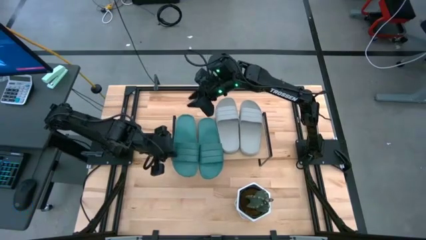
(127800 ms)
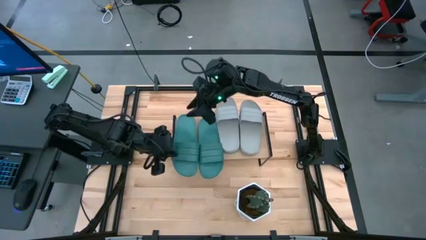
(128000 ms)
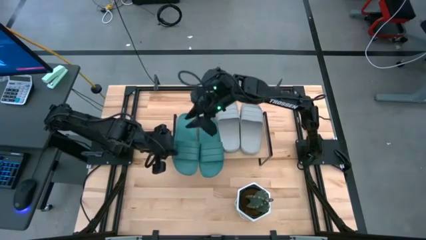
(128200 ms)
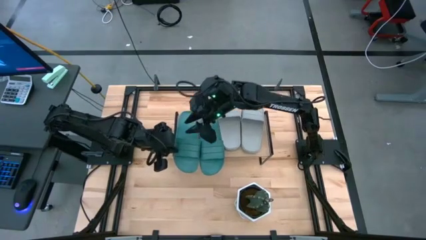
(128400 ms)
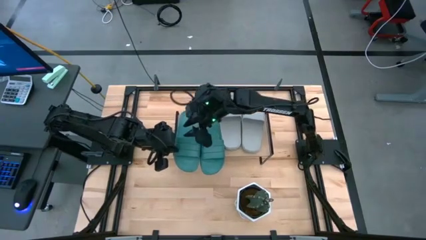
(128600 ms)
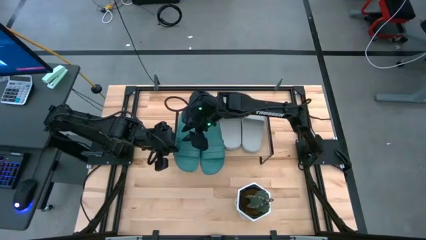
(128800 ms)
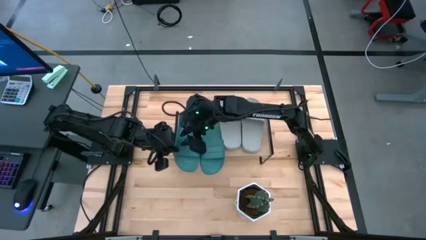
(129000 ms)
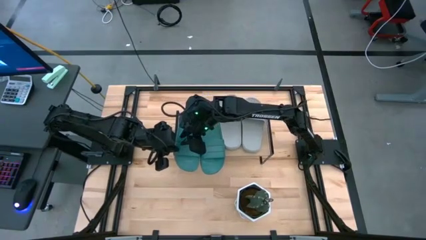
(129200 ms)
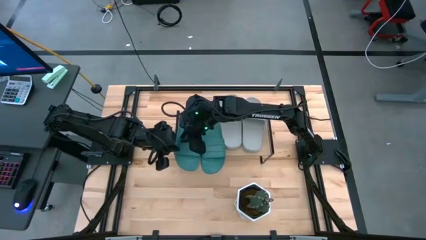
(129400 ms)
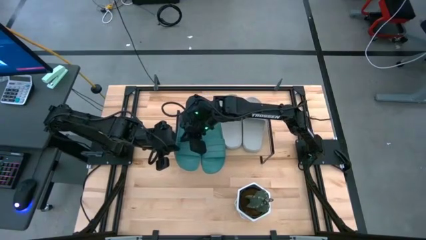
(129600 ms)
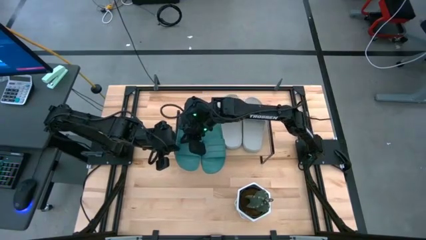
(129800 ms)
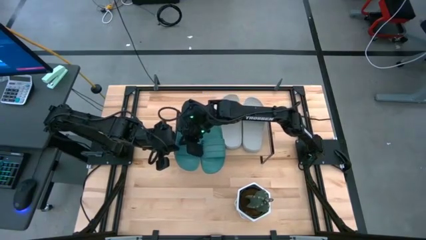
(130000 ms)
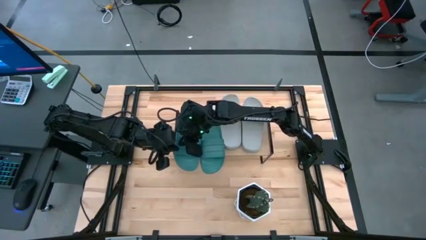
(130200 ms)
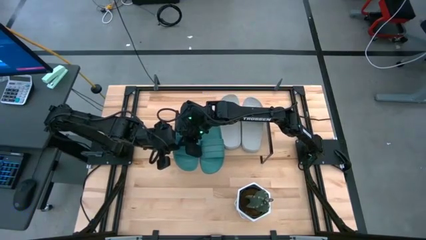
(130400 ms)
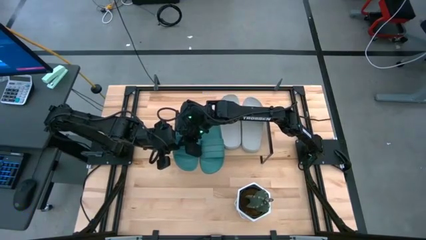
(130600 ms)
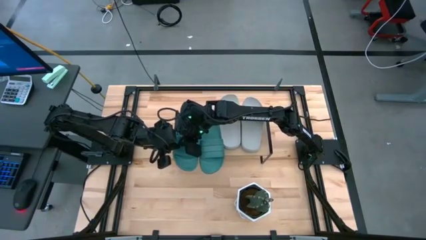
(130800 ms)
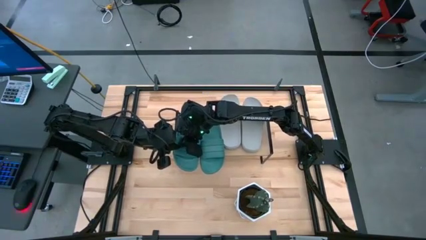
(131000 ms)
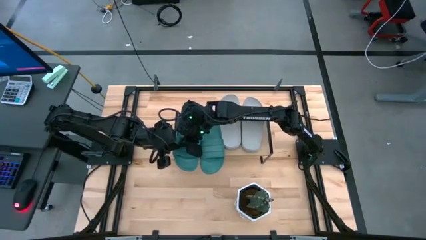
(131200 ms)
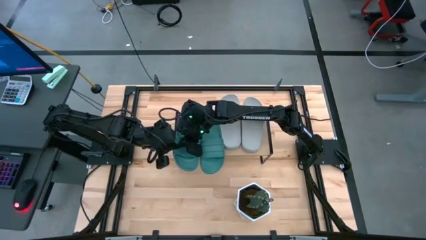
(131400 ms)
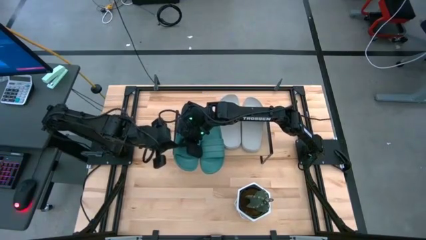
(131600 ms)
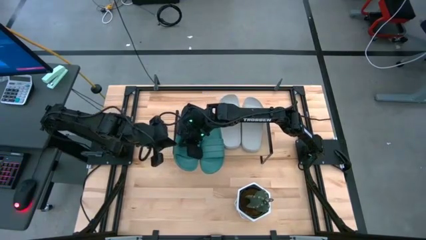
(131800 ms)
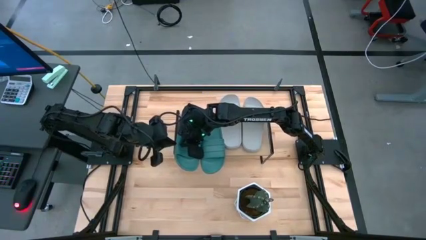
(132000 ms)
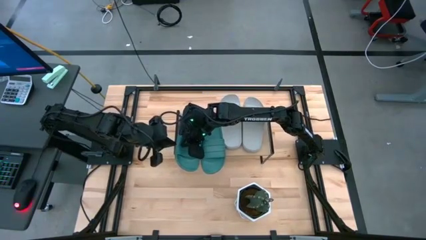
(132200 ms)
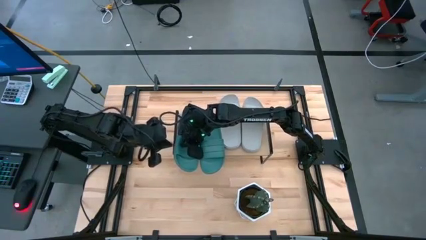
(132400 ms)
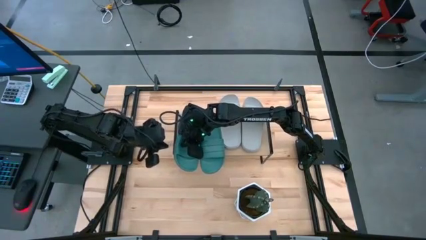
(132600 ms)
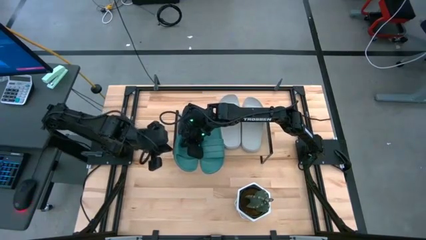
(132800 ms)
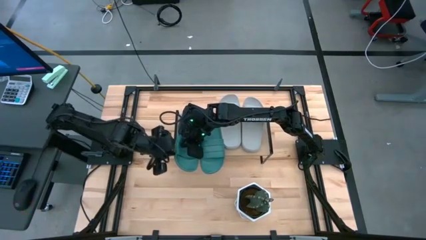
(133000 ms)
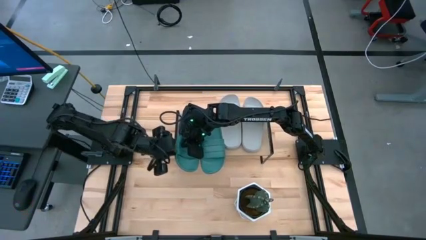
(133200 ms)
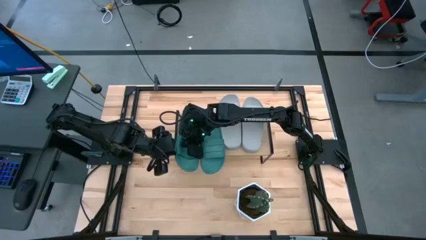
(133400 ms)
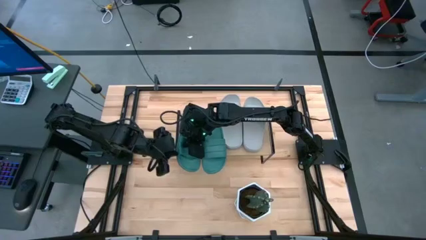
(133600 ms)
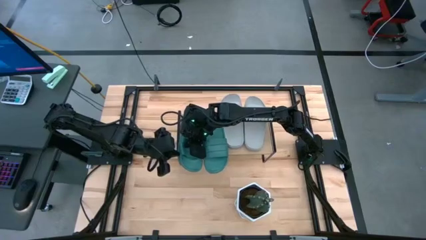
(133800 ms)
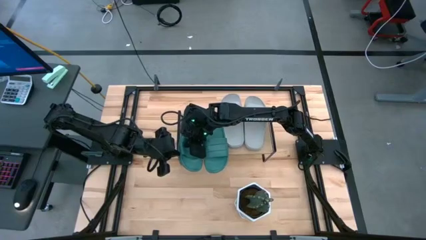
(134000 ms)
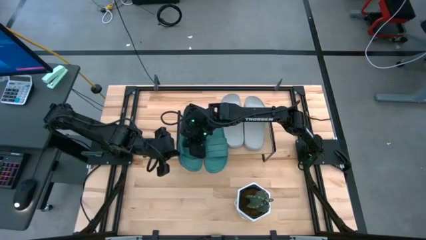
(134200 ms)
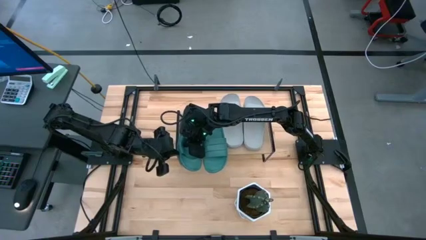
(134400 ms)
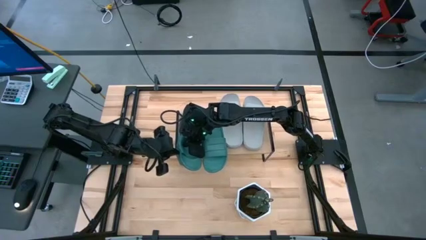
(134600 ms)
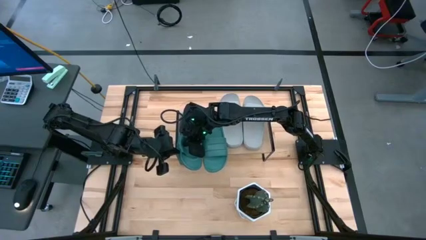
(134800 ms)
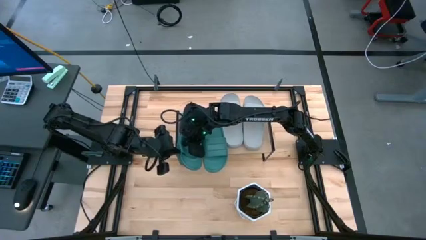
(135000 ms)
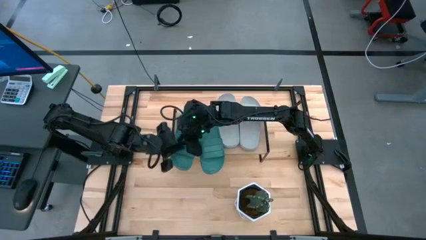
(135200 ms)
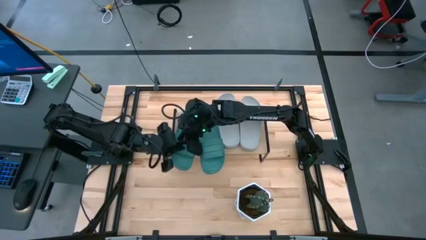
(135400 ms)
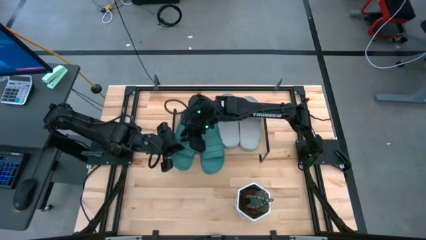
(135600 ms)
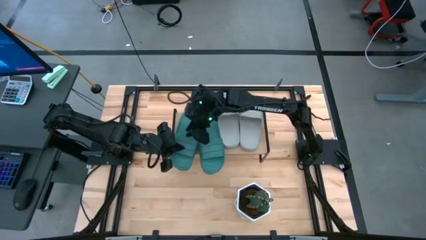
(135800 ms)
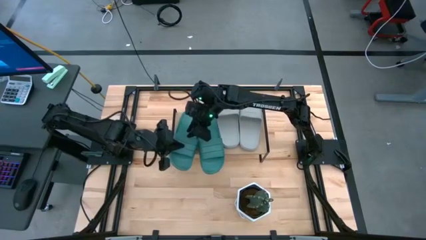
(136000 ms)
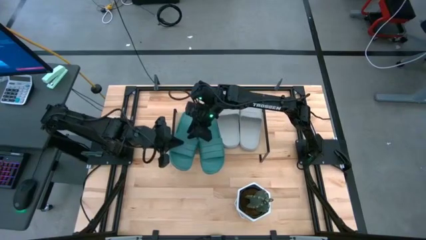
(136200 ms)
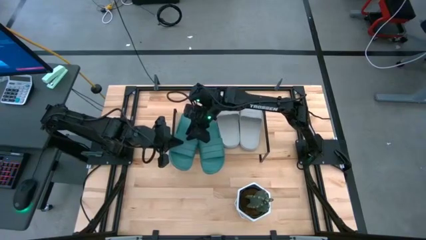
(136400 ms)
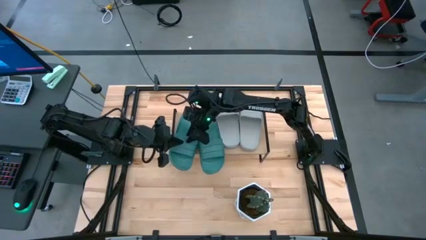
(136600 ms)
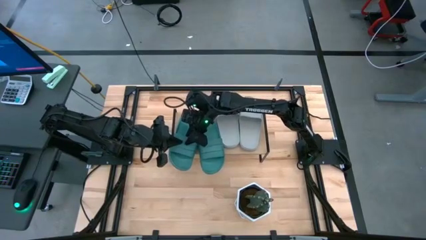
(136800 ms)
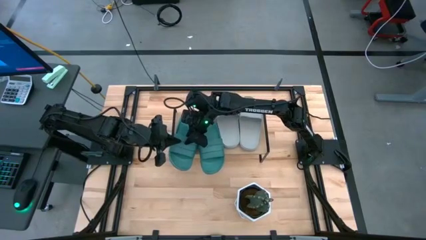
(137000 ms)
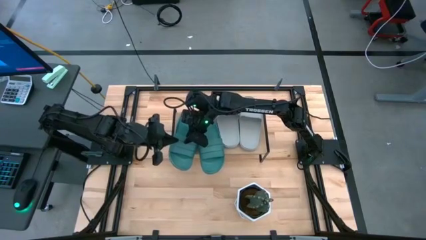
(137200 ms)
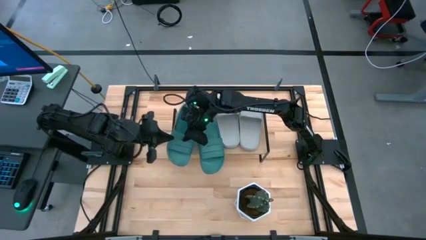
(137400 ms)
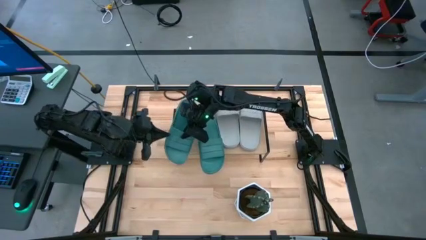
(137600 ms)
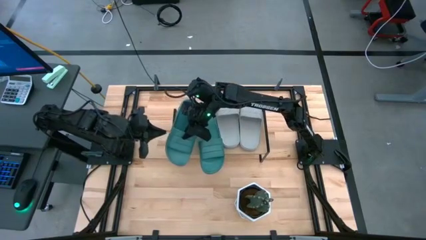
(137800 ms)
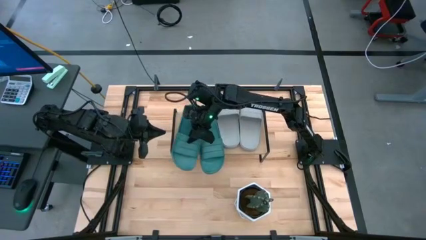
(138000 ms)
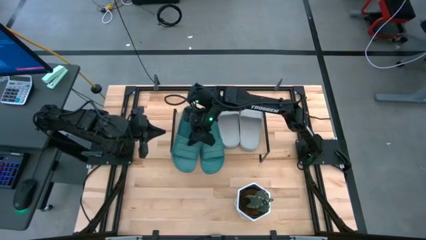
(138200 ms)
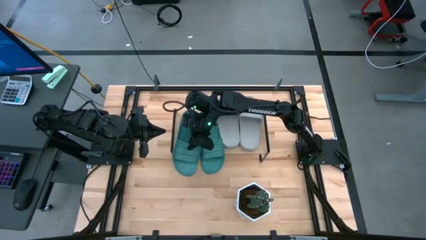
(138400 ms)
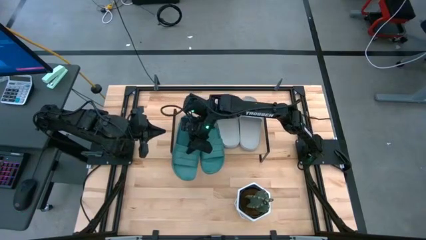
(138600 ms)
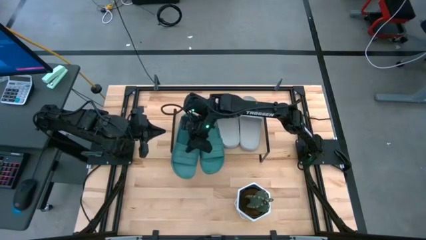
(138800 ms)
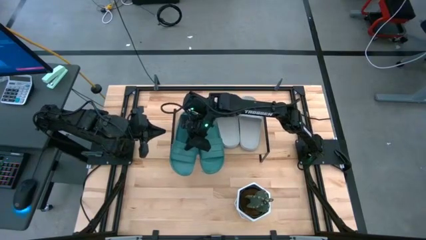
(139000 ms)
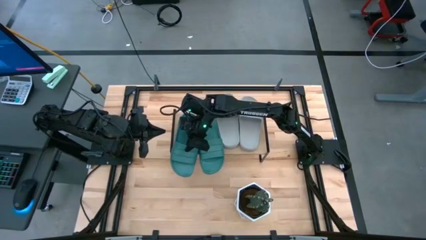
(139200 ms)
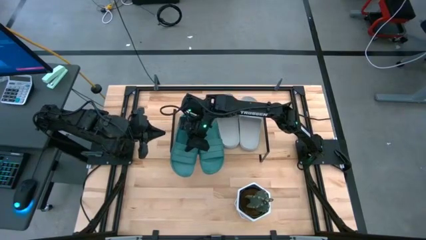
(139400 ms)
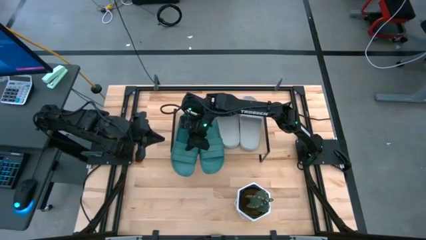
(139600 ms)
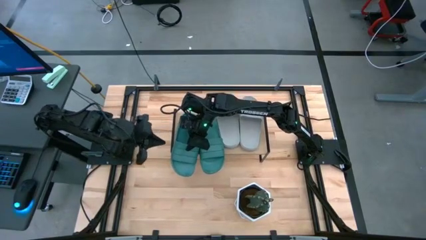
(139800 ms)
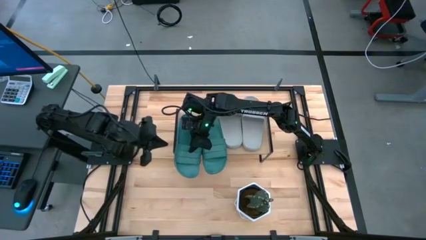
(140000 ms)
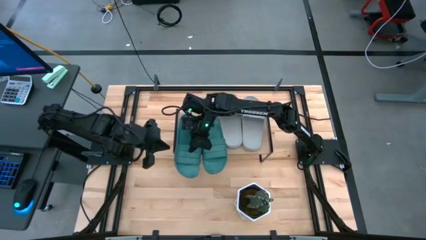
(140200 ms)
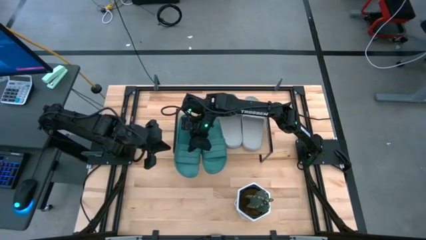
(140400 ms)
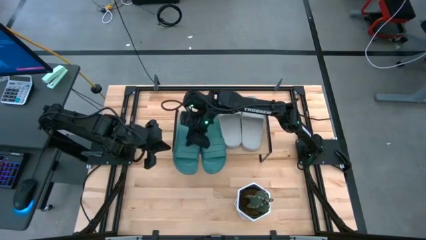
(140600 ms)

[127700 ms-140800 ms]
Task: Pick and place slides into the shelf
Put the green slide on the shelf
